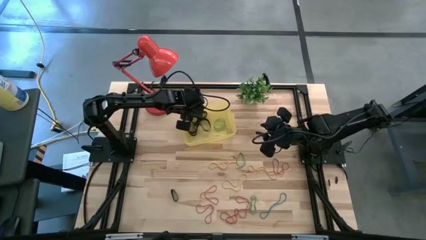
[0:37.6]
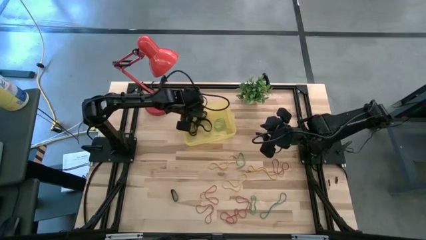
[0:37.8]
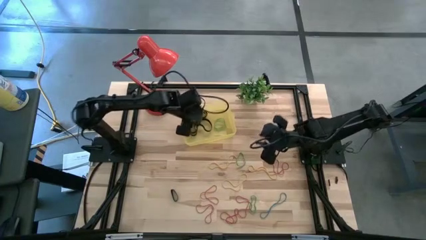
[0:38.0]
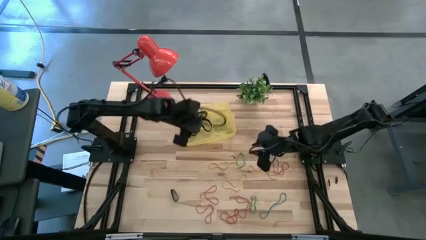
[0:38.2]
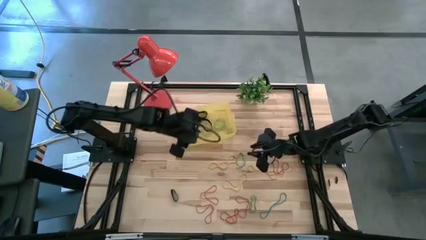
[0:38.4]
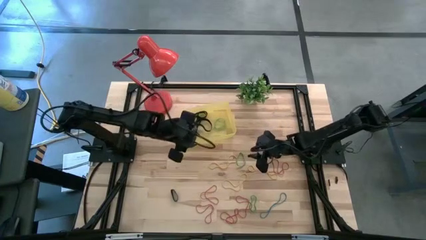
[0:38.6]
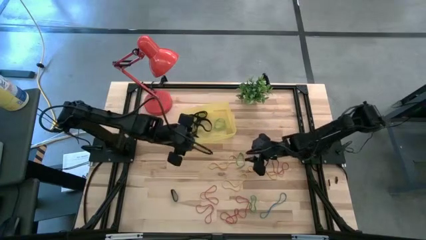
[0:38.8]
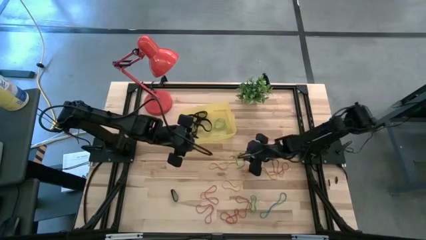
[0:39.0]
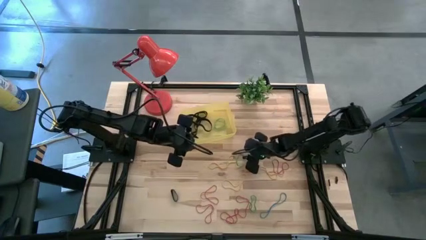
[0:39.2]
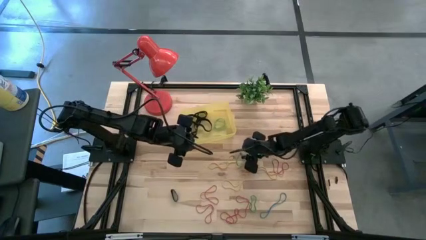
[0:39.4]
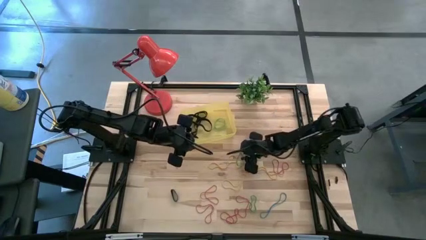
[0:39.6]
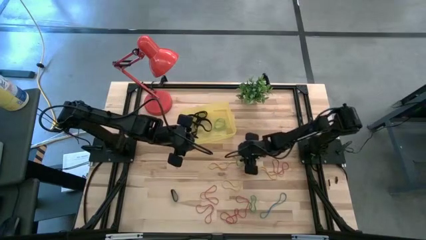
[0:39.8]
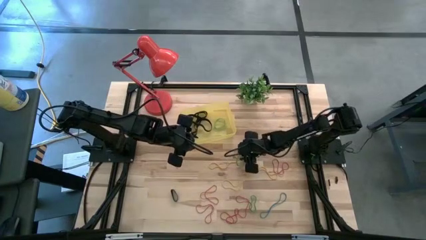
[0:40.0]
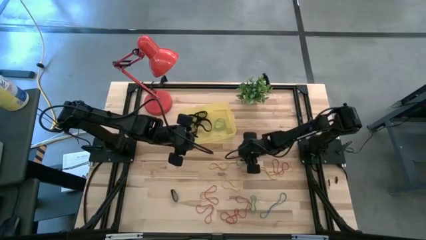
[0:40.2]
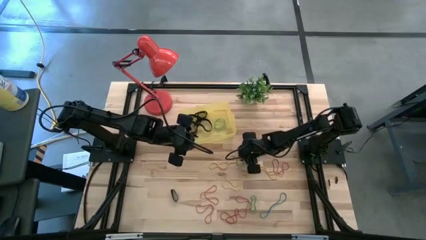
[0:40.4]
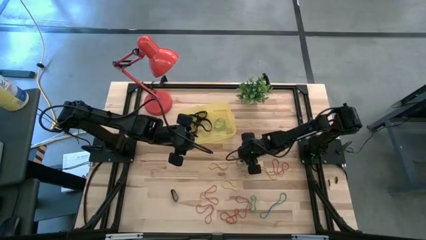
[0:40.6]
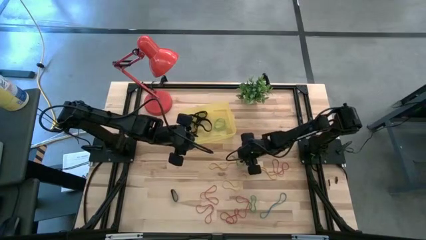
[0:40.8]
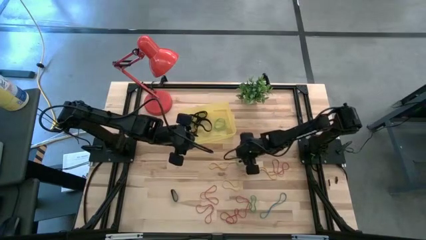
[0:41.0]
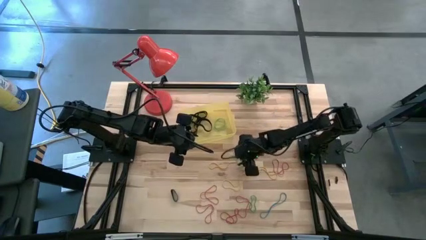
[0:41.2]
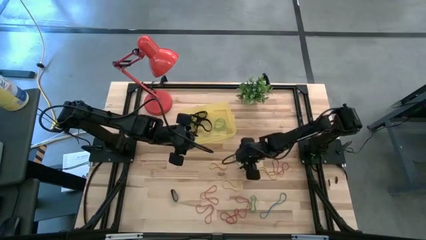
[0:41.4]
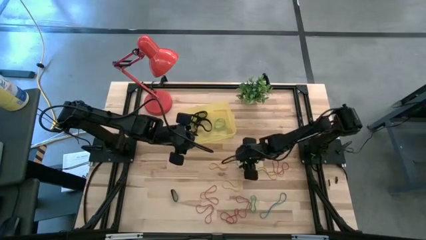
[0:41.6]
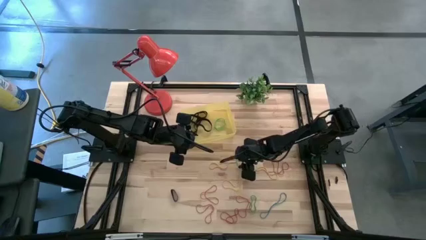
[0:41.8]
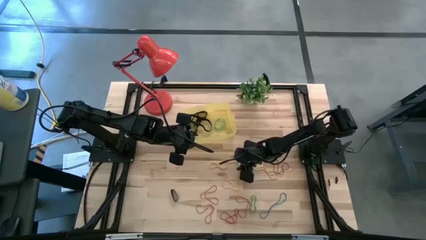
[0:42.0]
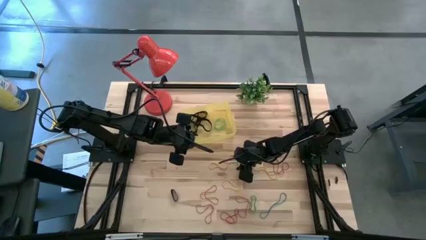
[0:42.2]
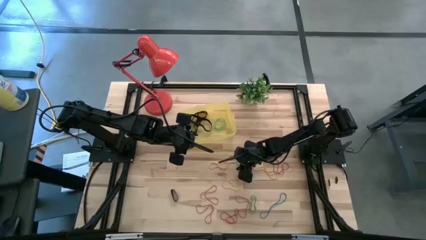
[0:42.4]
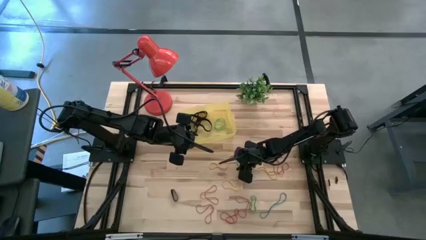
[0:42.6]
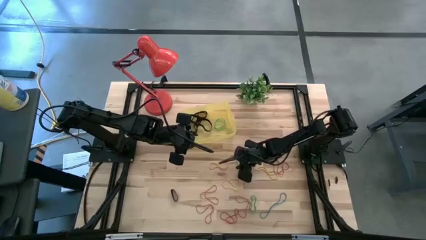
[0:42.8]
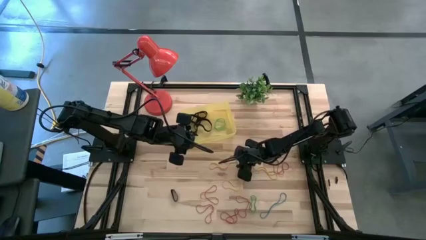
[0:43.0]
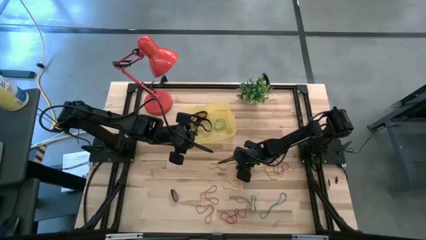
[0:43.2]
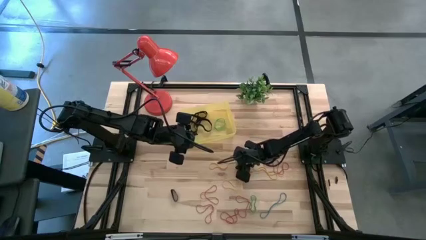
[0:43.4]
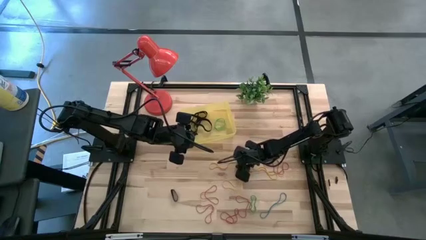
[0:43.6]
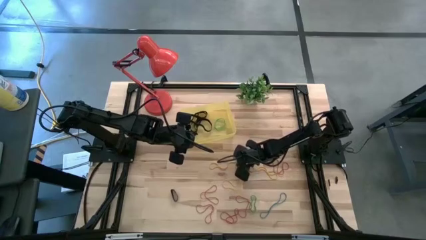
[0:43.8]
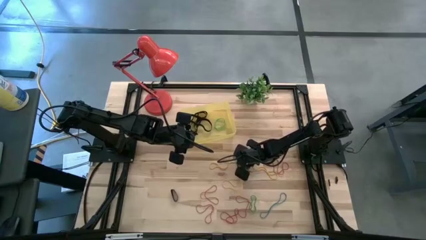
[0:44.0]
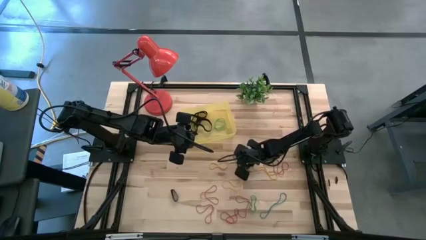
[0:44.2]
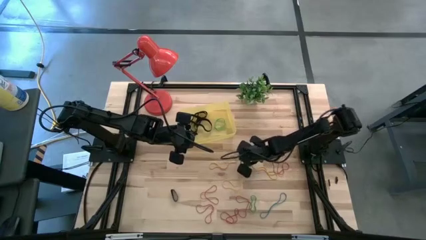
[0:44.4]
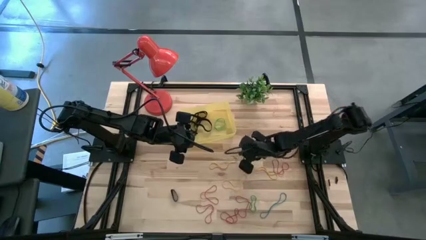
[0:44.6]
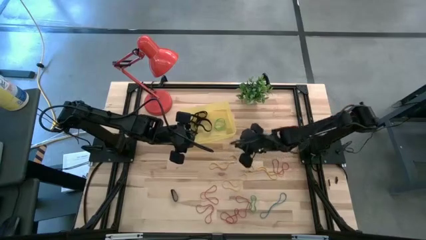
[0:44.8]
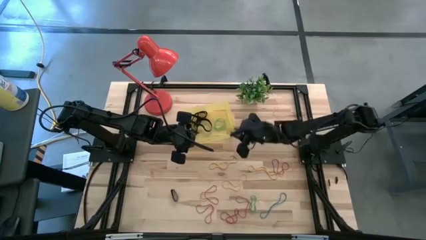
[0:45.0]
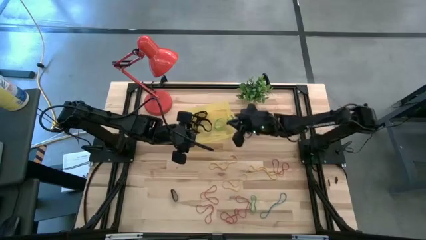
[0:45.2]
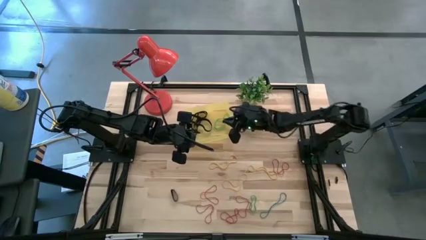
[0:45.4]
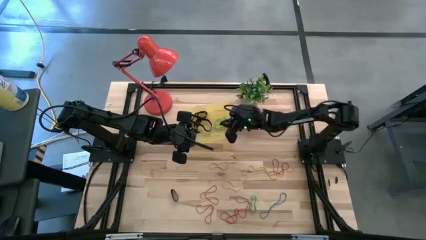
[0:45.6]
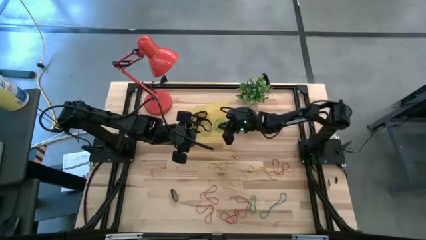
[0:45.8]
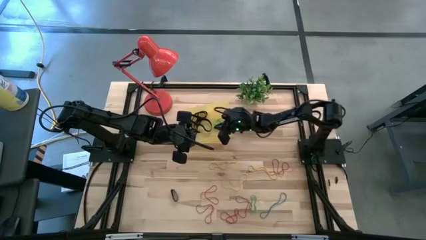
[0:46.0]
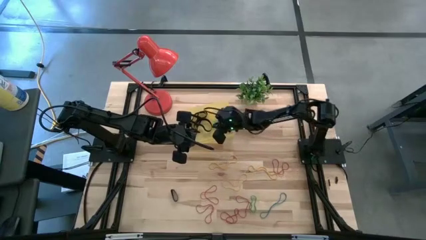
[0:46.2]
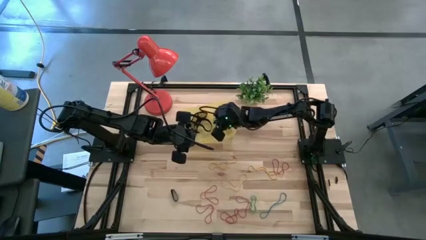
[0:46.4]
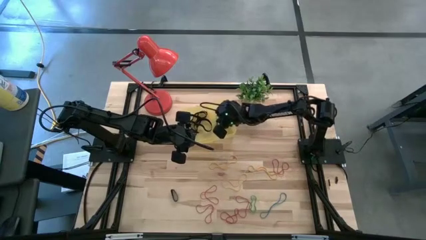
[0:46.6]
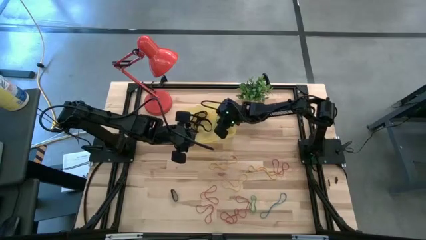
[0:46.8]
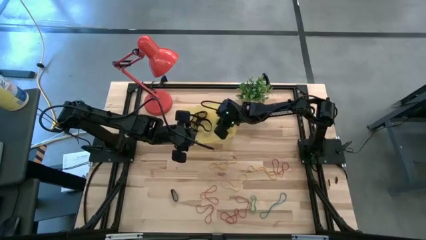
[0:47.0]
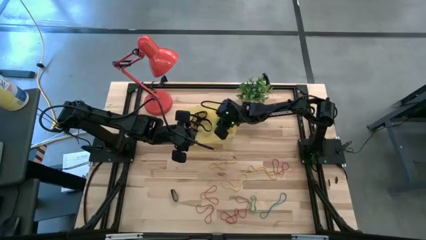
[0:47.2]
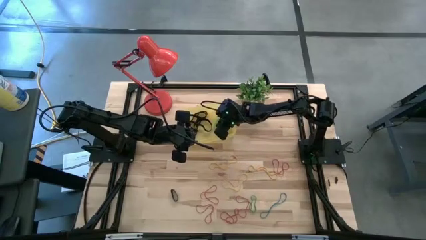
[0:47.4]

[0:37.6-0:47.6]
Task: Pick and place rubber bands into bin
Put the green rubber band into the yellow bin

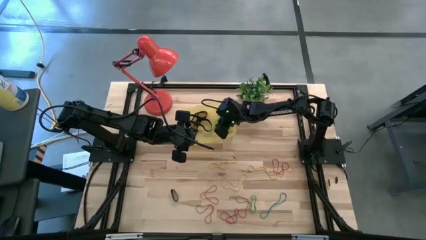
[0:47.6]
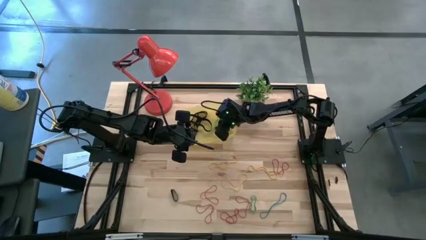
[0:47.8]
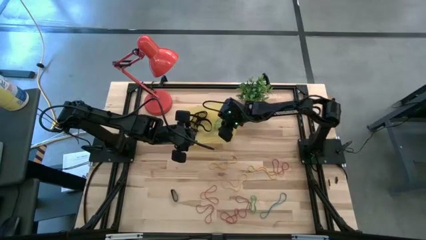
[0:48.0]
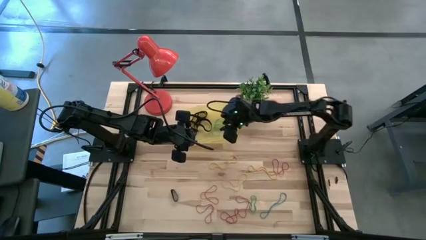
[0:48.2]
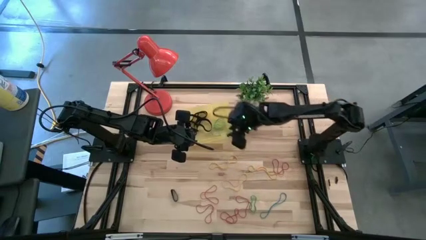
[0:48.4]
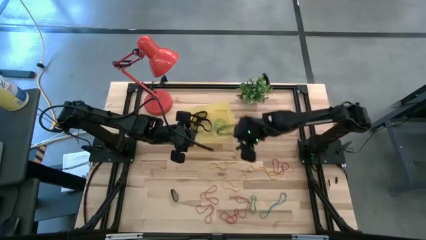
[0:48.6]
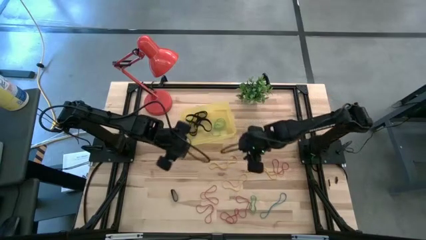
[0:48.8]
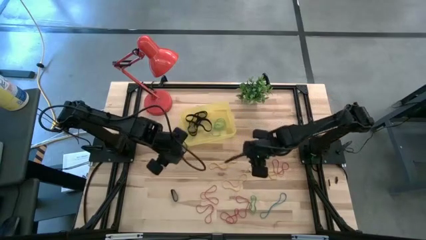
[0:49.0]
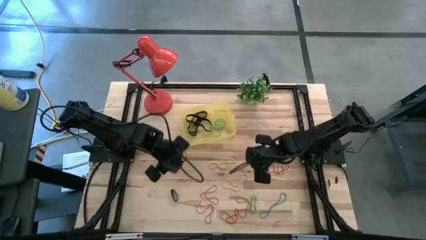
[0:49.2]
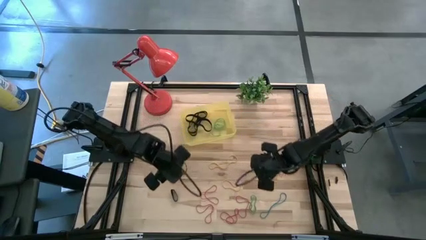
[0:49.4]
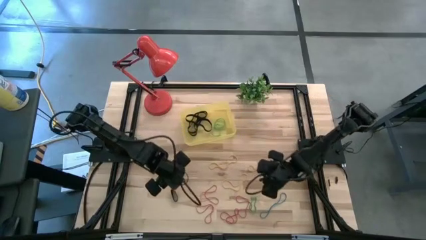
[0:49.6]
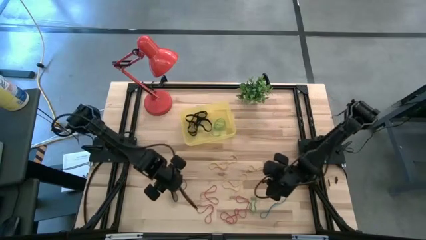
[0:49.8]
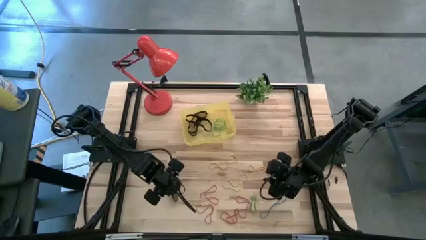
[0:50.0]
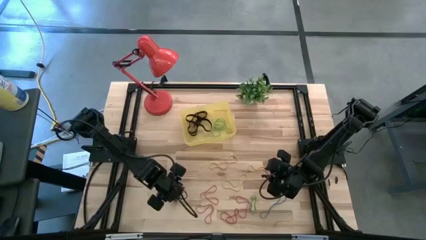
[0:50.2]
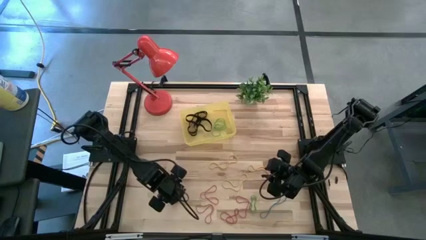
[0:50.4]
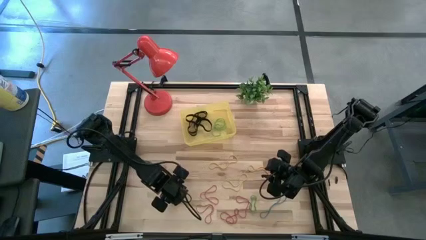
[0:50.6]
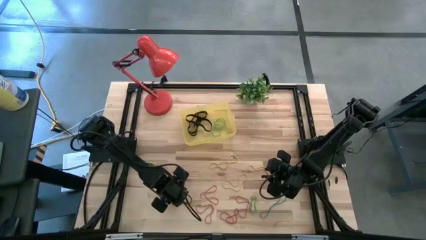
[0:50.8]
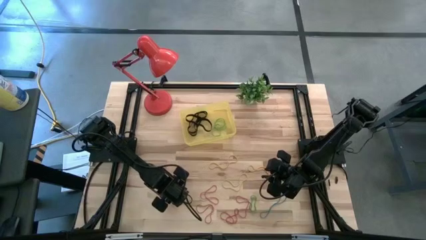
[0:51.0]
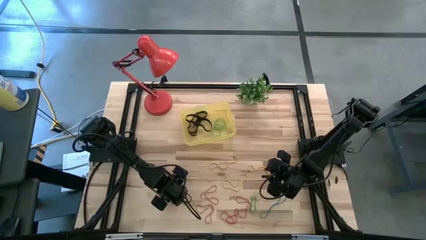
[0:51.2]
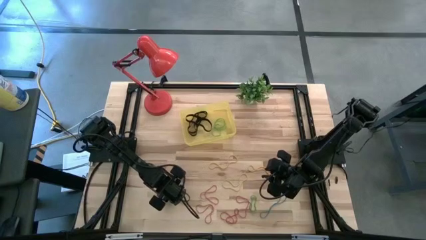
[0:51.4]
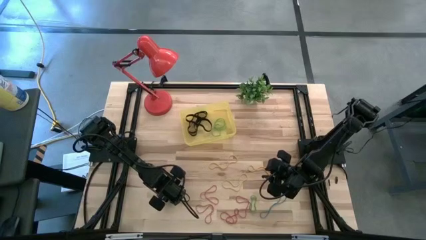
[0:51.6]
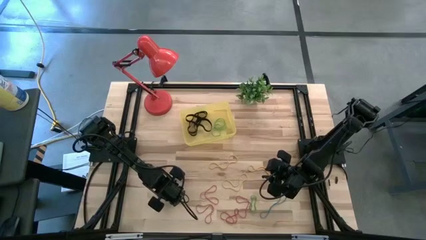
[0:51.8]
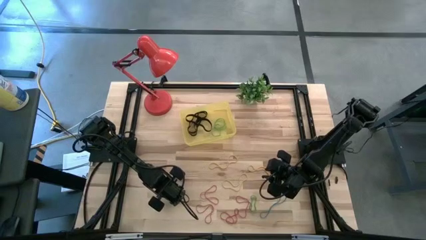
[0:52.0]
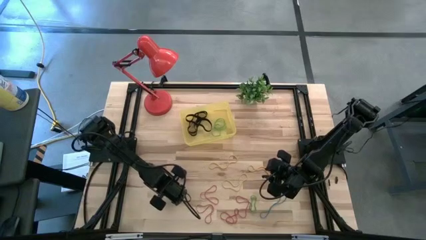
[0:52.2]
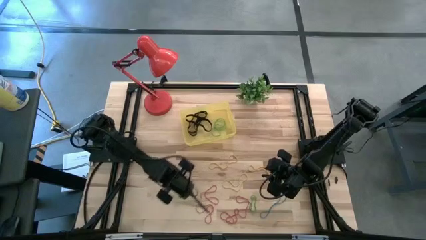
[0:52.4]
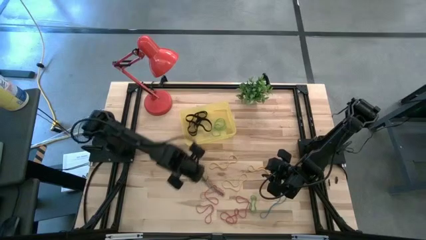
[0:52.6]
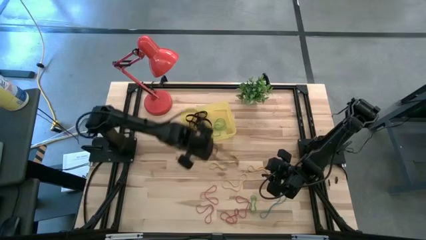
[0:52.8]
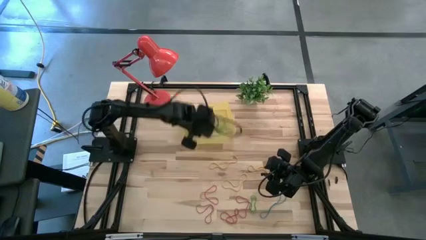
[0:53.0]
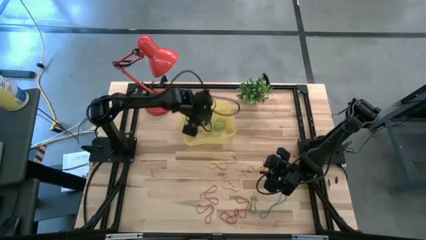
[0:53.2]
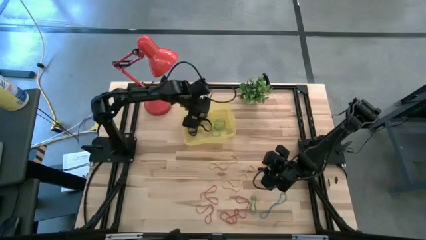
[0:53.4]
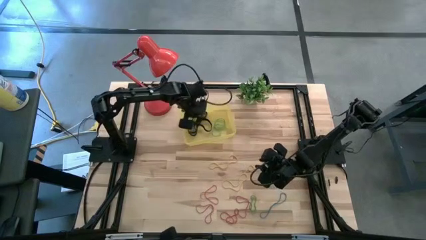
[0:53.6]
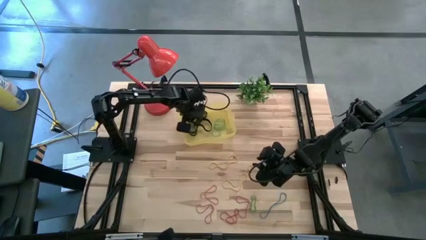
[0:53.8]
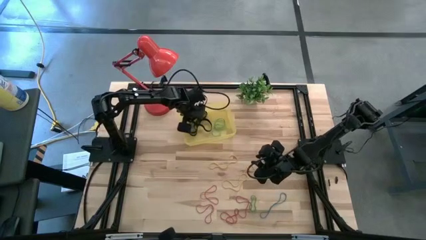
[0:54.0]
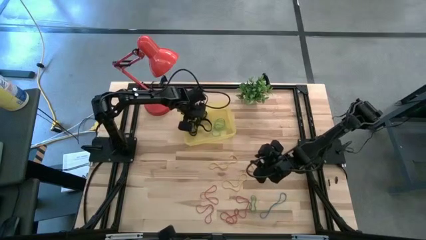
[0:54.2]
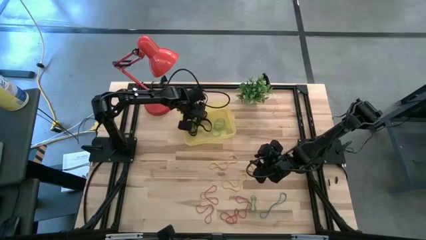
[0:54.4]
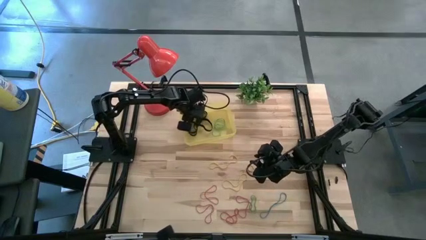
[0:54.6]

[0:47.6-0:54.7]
Put the black rubber band into the yellow bin

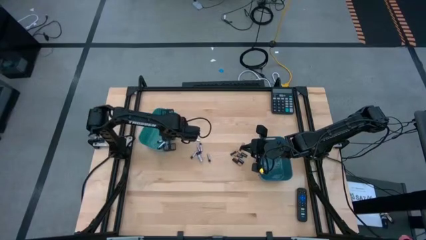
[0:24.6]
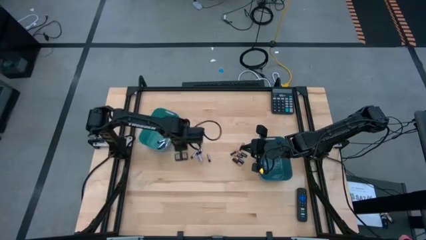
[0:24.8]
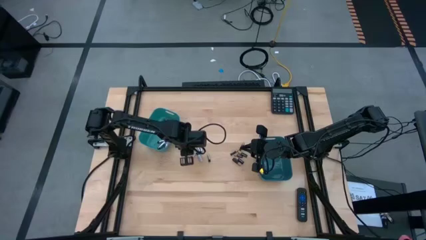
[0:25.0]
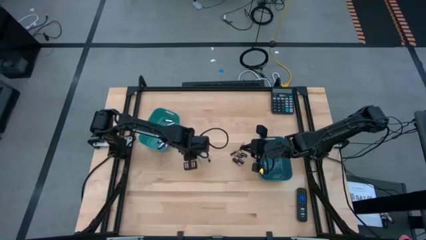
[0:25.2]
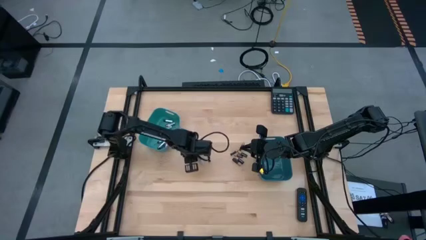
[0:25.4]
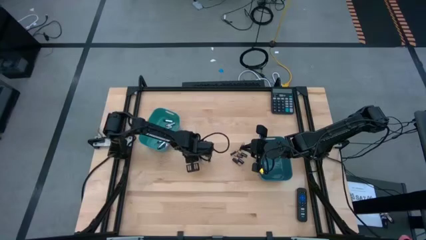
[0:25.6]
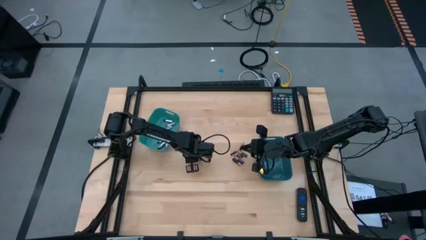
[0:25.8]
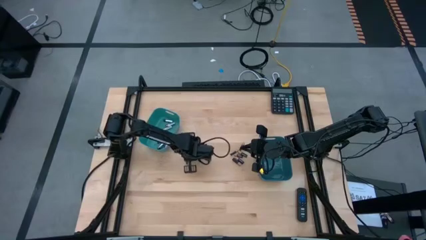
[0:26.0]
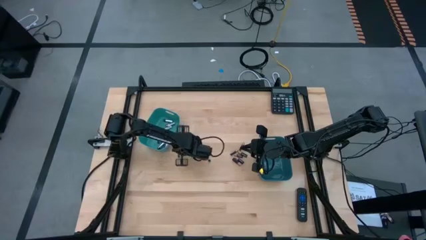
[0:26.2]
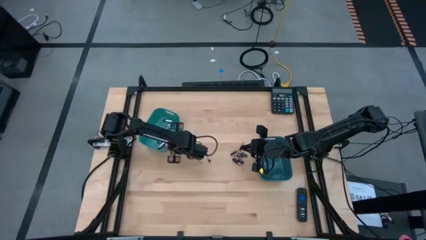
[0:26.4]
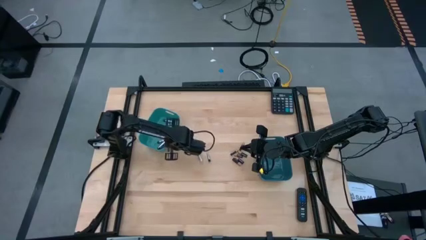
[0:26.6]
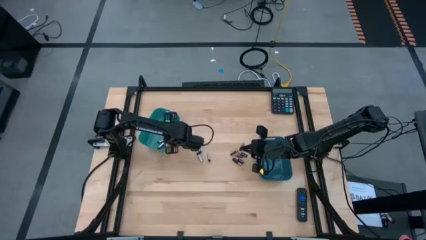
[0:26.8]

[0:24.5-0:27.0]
Task: Sort batteries
Put the silver battery into the green bin
